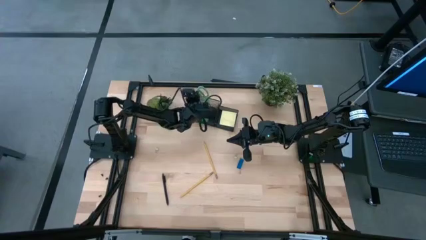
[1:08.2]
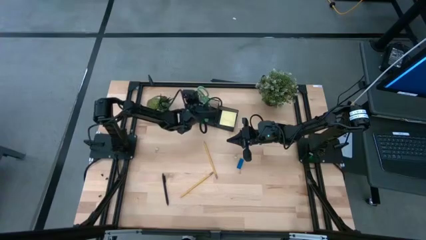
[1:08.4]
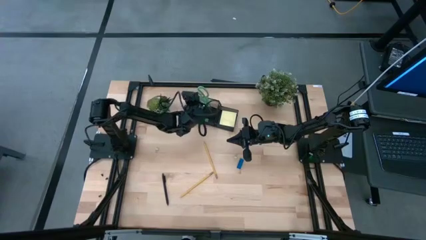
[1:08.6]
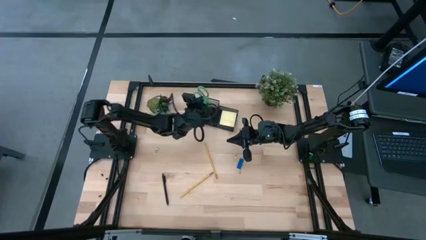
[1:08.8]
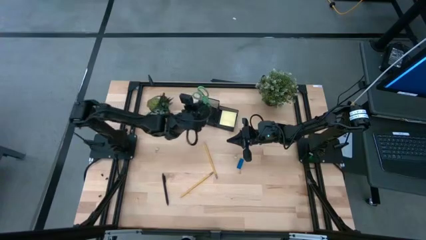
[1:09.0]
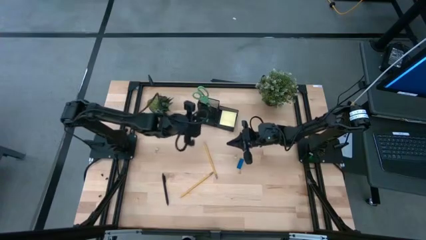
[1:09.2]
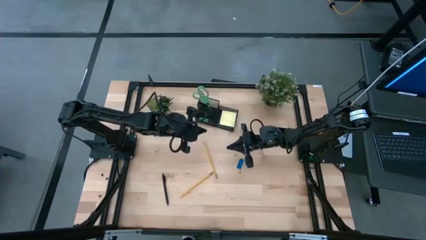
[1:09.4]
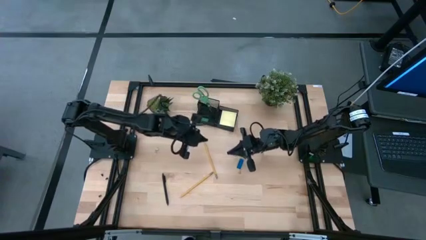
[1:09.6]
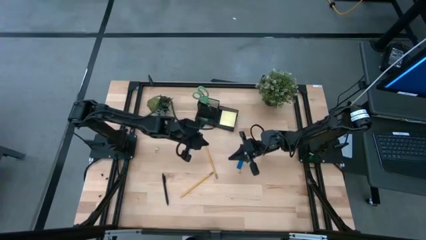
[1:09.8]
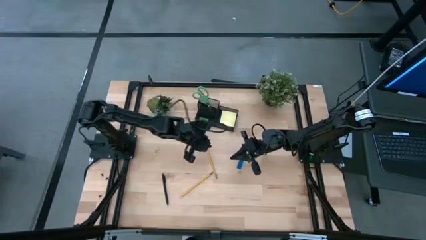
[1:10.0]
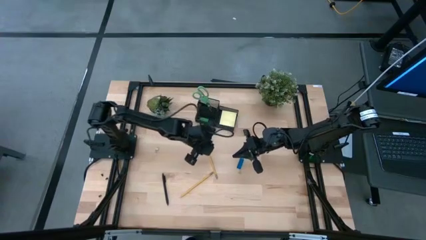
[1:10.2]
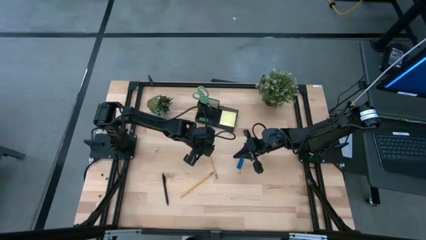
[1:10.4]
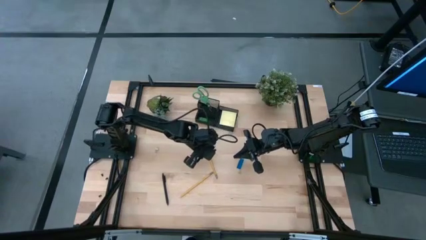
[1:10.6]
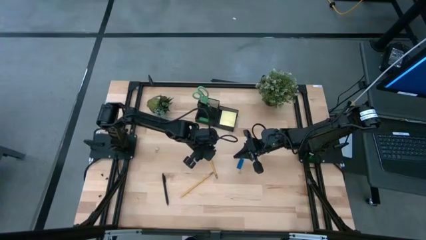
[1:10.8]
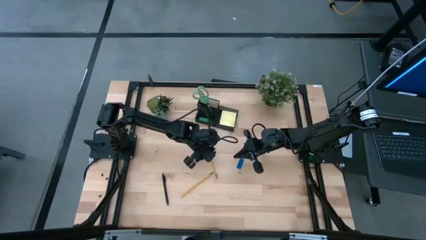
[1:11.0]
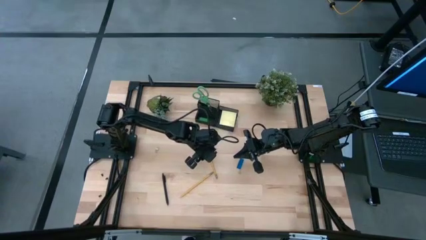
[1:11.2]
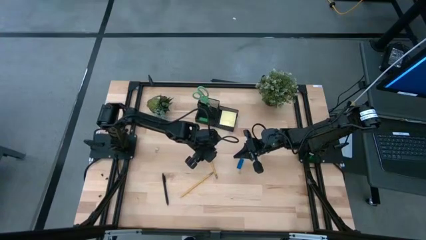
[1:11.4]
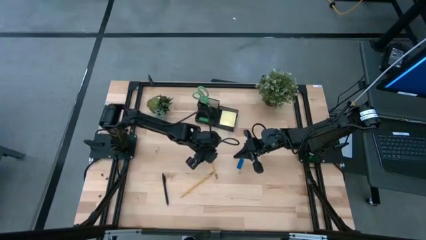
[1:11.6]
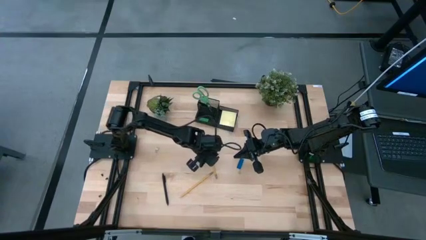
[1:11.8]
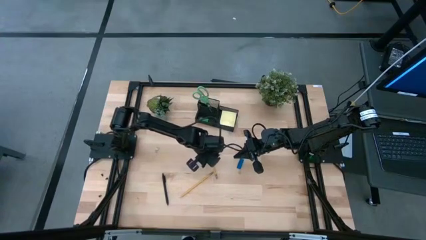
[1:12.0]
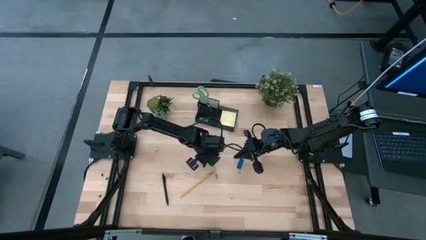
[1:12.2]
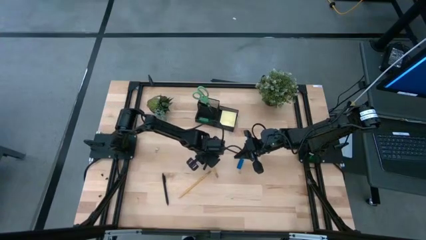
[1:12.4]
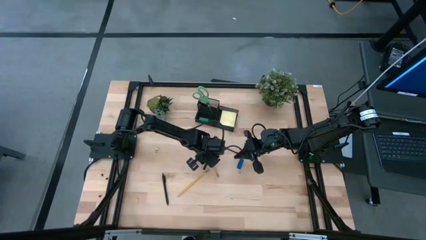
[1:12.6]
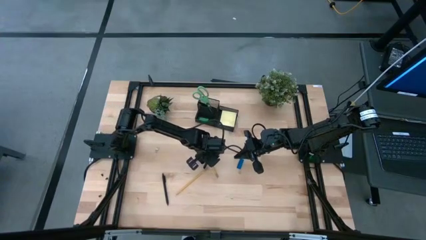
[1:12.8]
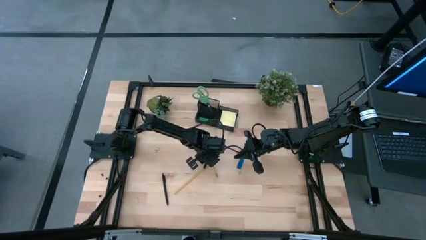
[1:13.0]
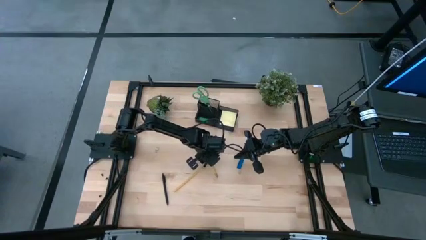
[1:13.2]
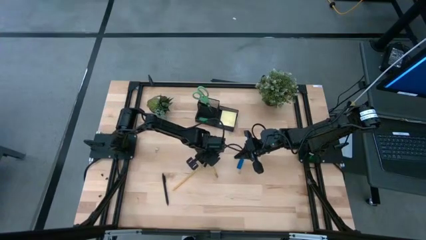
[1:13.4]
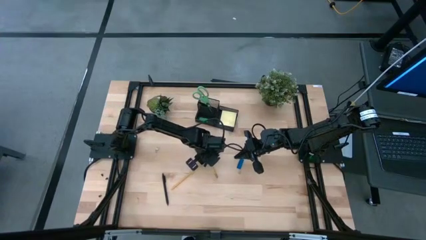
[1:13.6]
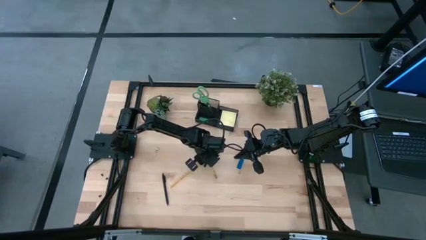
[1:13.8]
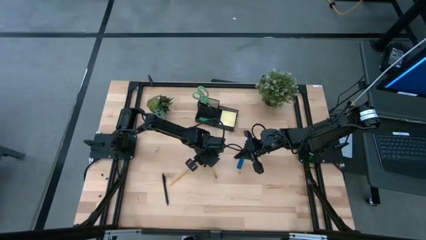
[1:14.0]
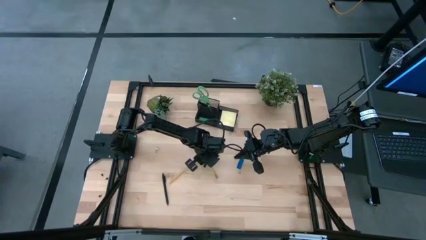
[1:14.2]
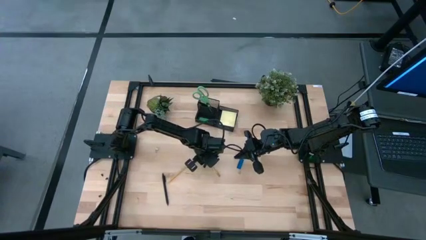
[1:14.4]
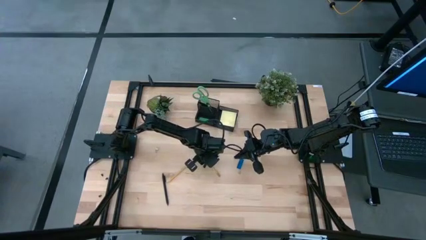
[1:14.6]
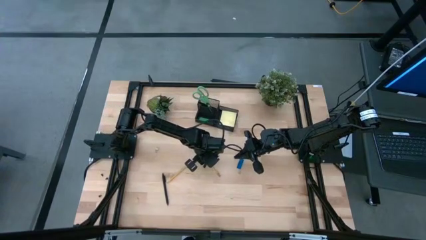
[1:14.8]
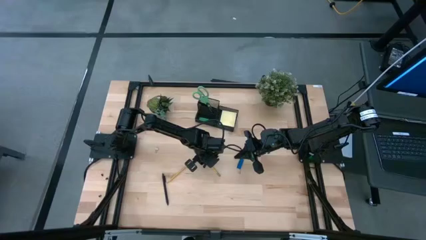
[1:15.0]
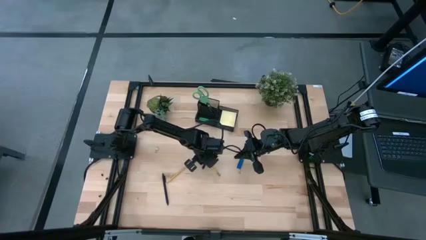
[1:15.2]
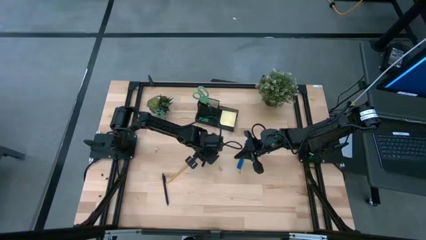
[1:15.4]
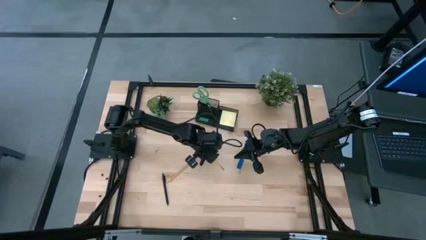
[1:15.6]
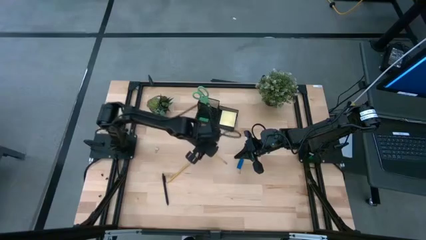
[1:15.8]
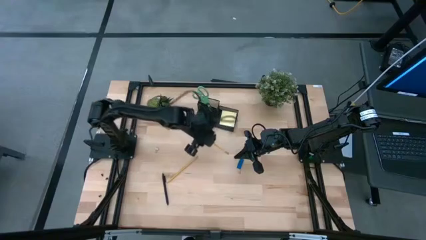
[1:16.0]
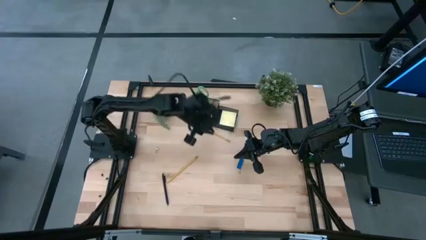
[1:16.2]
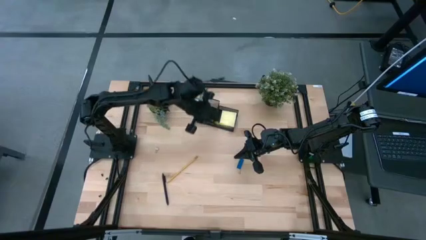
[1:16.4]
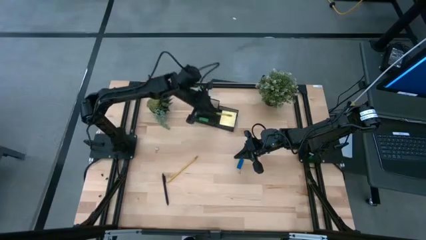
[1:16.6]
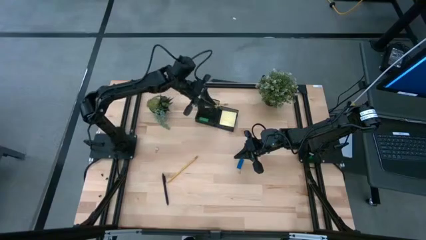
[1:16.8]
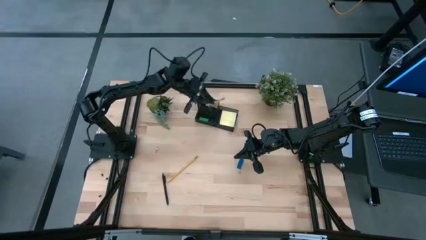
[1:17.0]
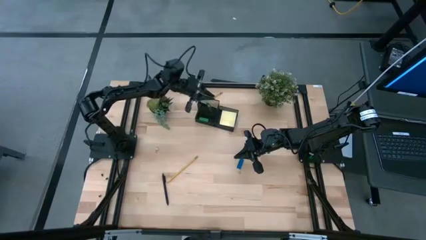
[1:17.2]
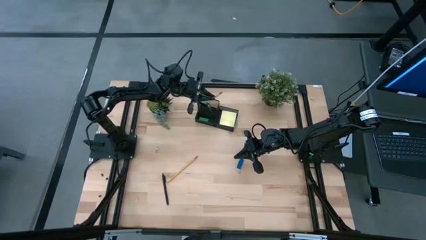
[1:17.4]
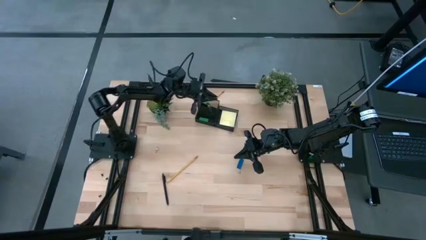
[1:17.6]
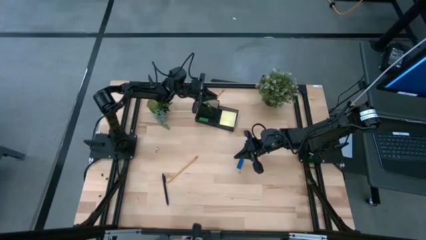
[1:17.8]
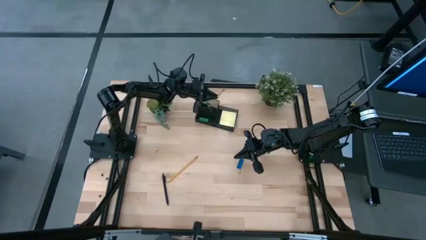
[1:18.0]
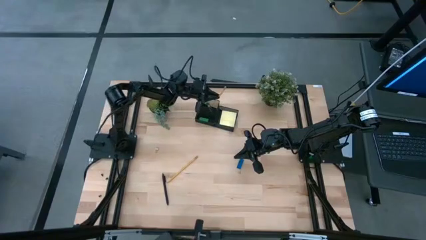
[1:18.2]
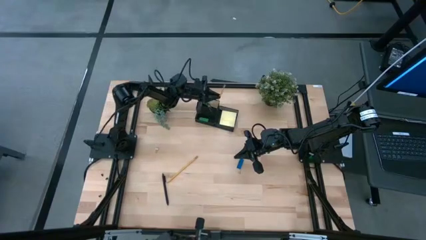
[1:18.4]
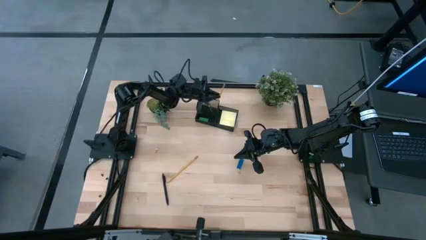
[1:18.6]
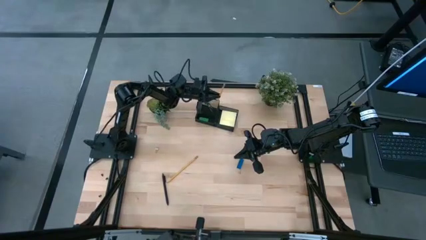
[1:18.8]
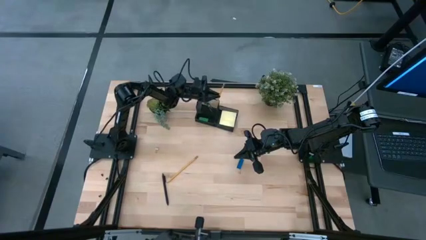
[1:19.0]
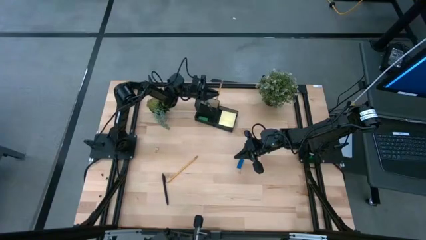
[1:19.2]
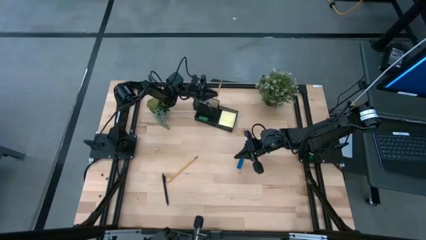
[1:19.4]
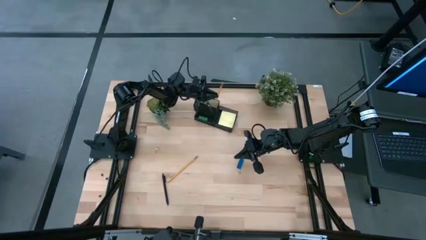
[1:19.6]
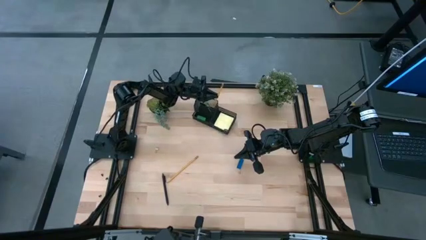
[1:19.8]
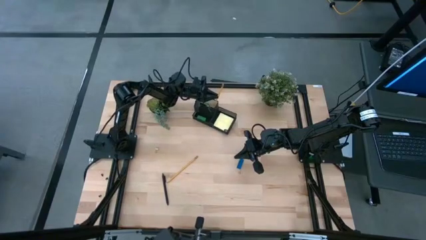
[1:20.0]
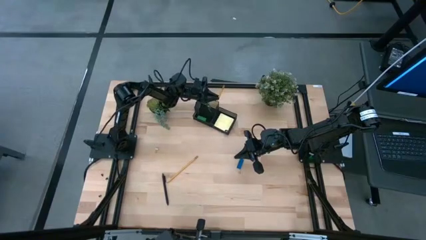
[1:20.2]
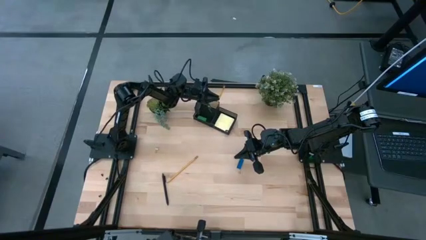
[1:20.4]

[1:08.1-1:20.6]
Task: Pick and place office supplies into organizer
Put the top pencil into the desk organizer

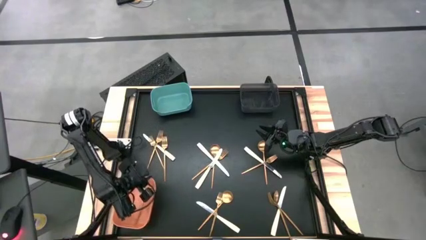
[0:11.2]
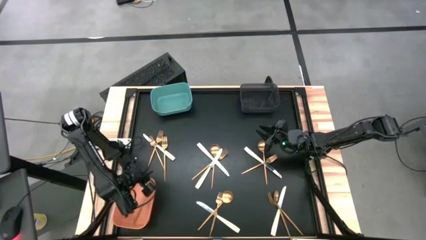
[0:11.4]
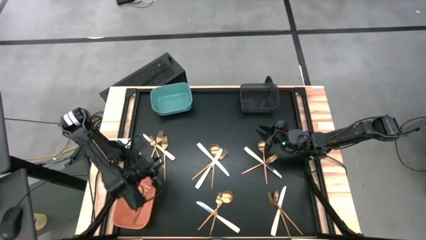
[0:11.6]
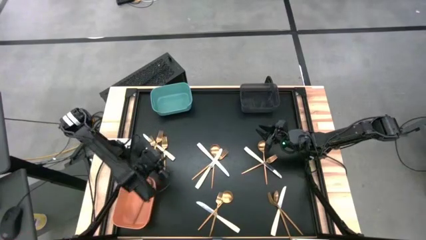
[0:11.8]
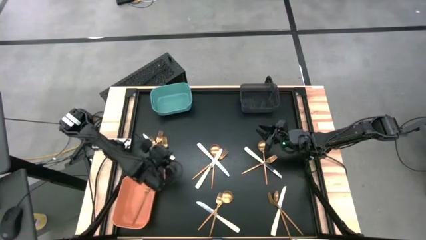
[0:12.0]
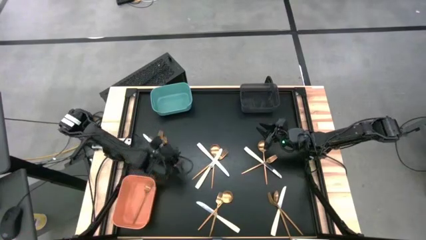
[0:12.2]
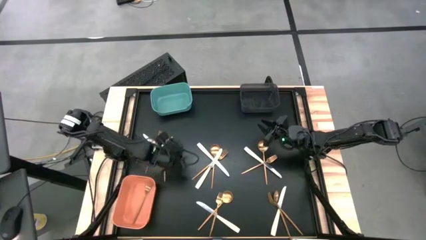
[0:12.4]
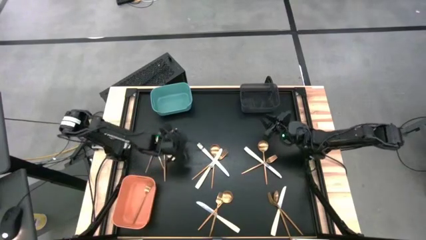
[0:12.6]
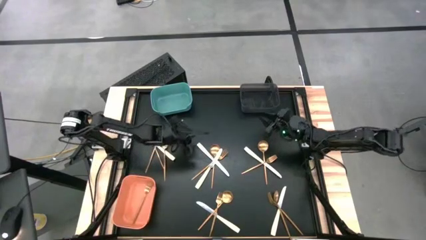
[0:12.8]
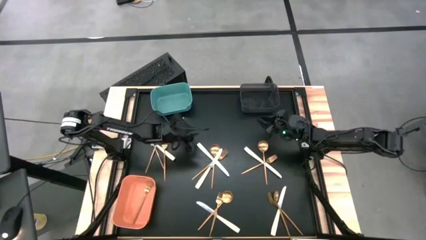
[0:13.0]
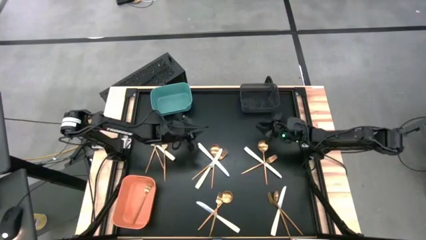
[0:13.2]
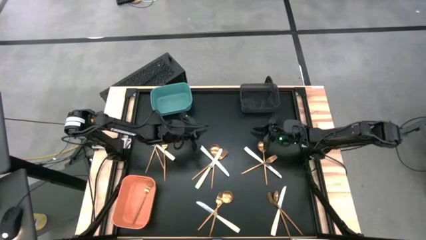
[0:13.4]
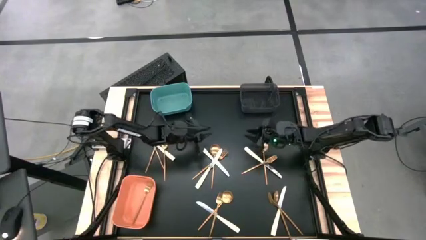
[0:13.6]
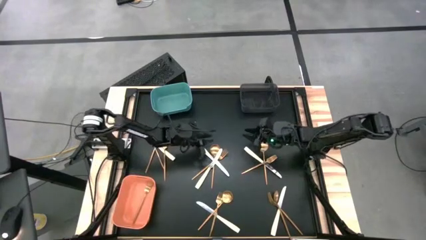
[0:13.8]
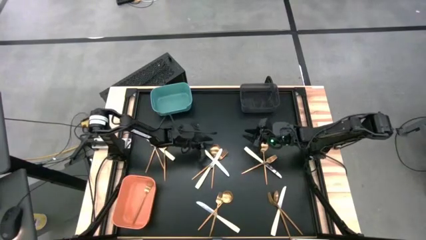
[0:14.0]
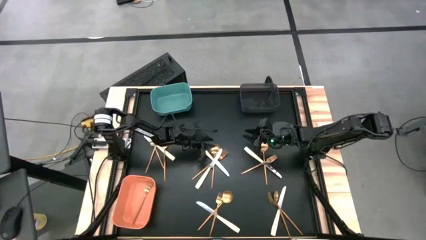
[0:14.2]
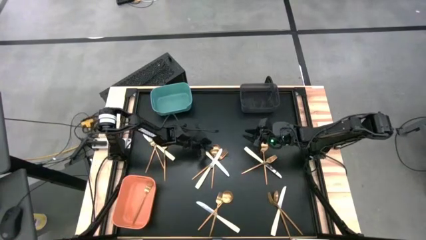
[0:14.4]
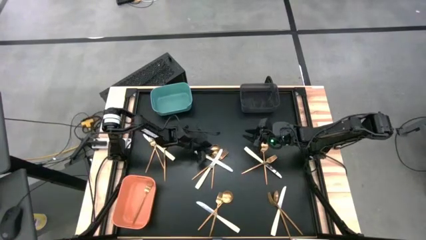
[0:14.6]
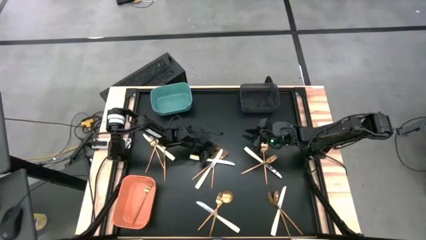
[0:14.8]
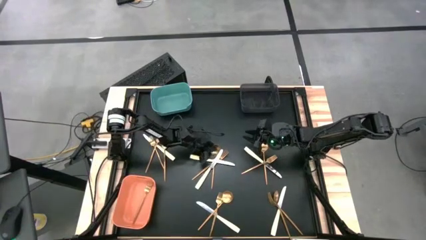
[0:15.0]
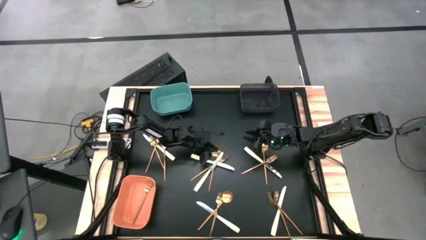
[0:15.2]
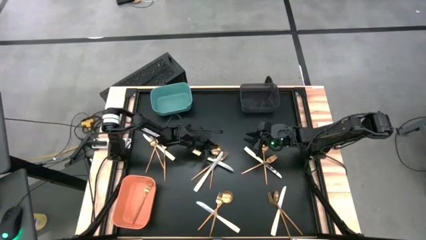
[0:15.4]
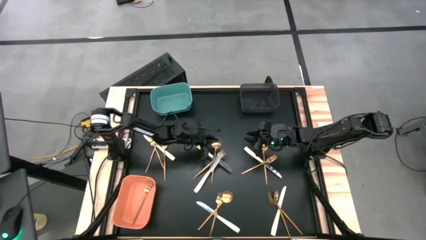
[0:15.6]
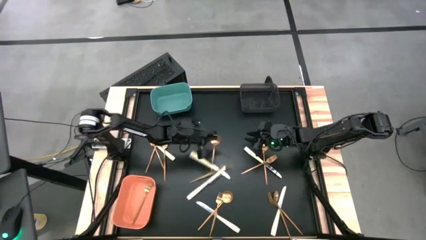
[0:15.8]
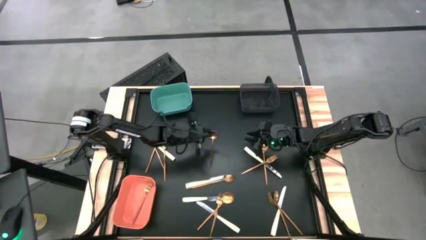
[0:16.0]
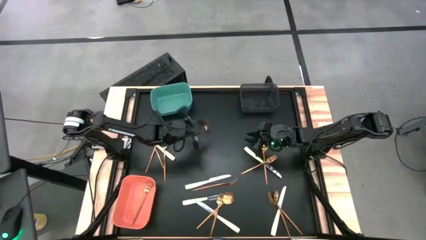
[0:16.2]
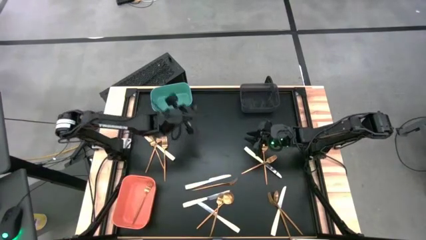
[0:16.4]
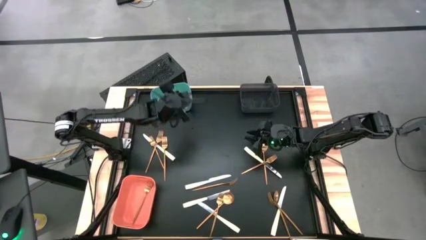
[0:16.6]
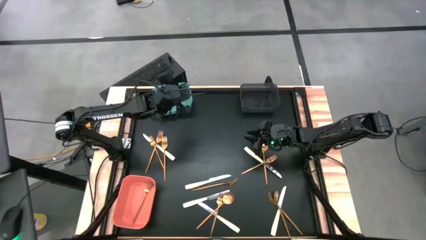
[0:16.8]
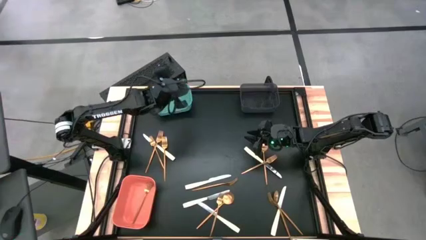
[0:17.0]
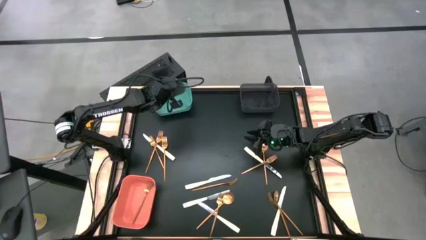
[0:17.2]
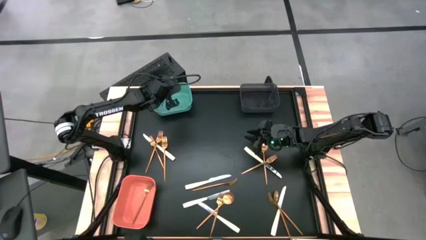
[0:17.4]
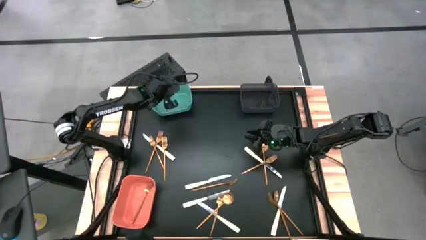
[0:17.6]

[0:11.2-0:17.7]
Task: Sort silverware by color (type)
Put the gold spoon into the green bin
